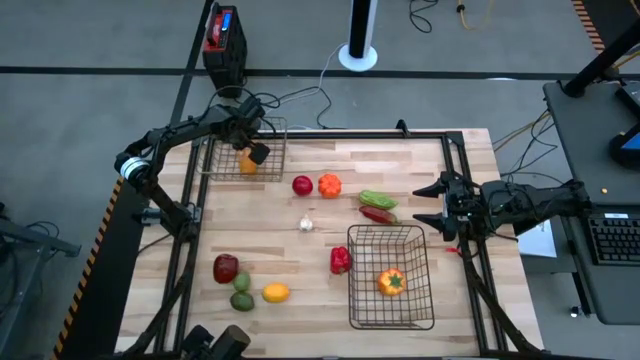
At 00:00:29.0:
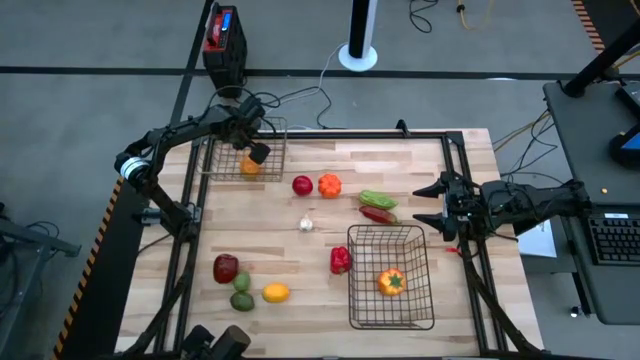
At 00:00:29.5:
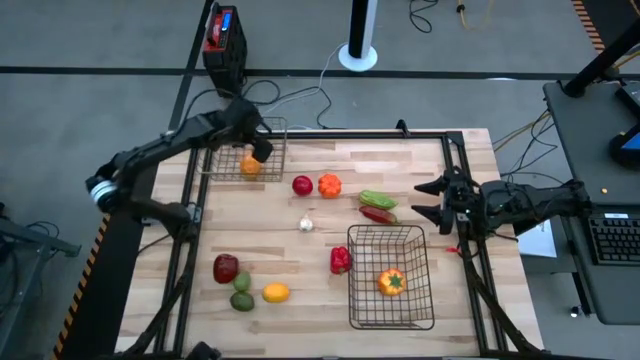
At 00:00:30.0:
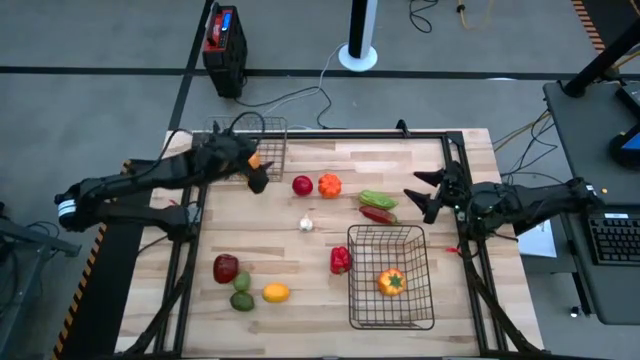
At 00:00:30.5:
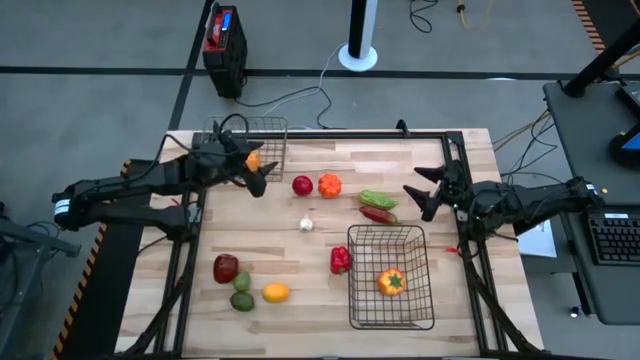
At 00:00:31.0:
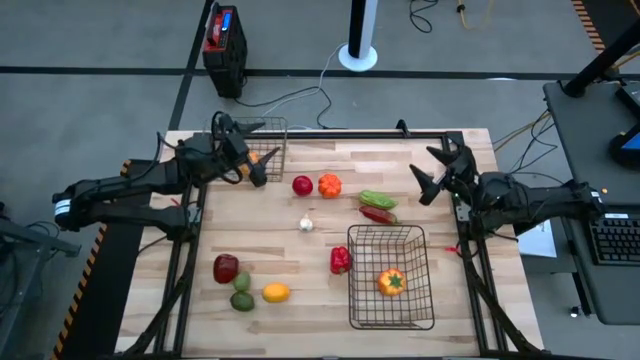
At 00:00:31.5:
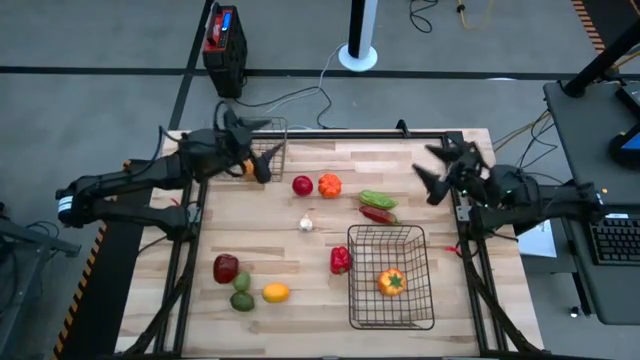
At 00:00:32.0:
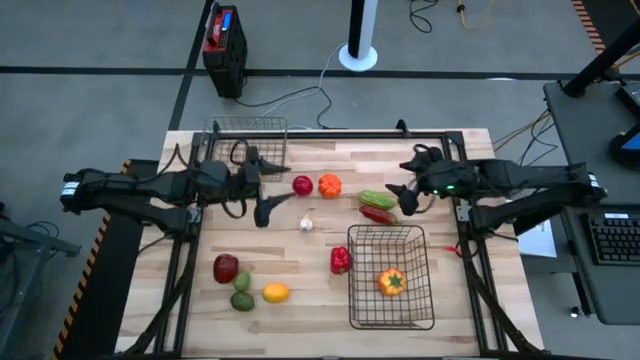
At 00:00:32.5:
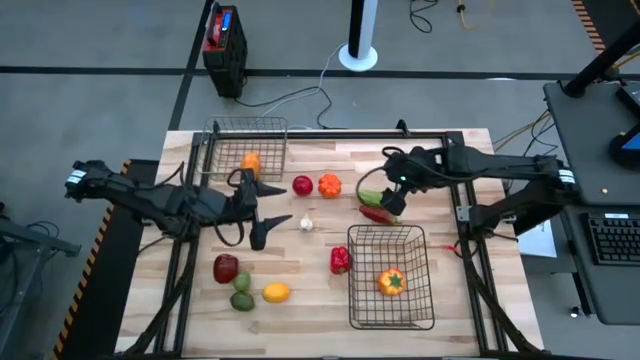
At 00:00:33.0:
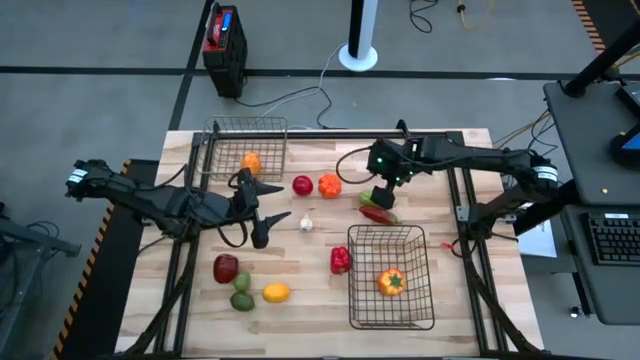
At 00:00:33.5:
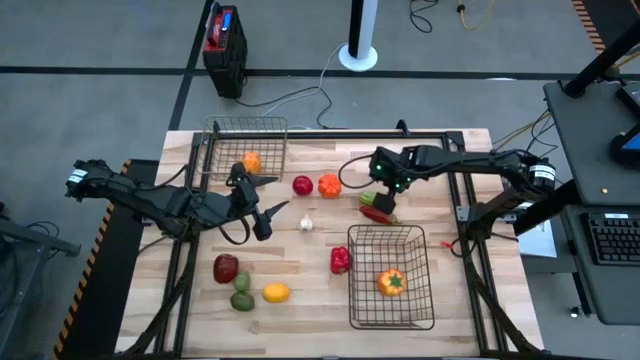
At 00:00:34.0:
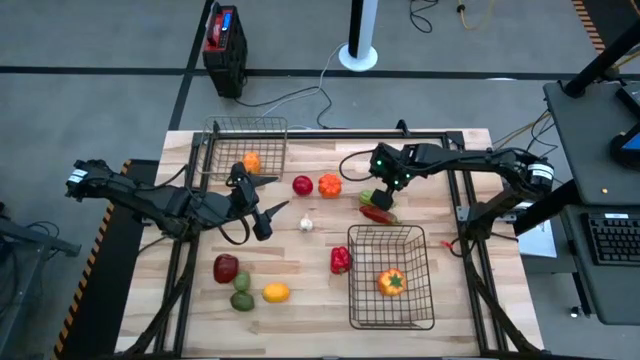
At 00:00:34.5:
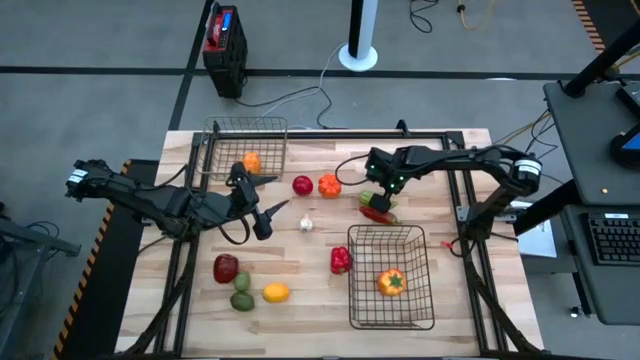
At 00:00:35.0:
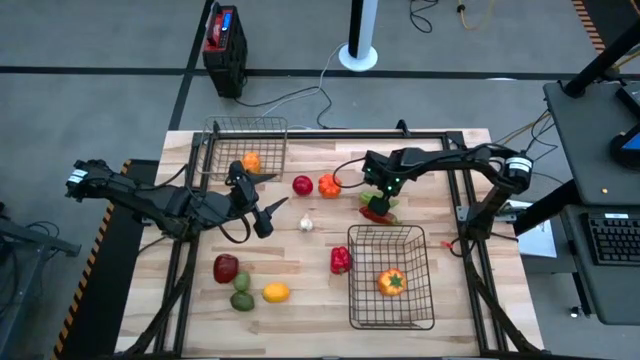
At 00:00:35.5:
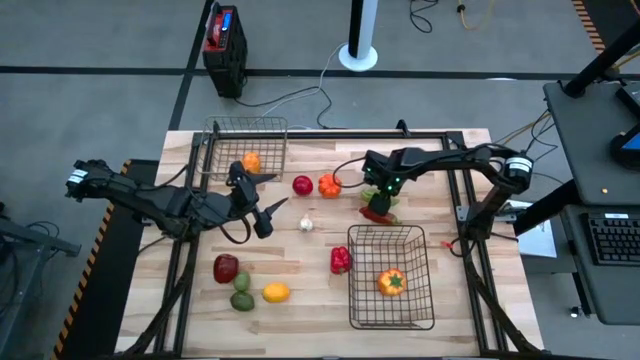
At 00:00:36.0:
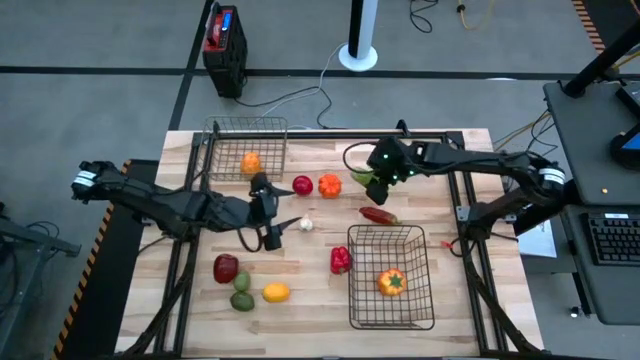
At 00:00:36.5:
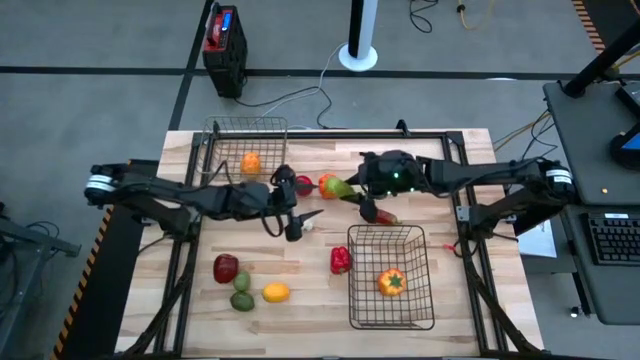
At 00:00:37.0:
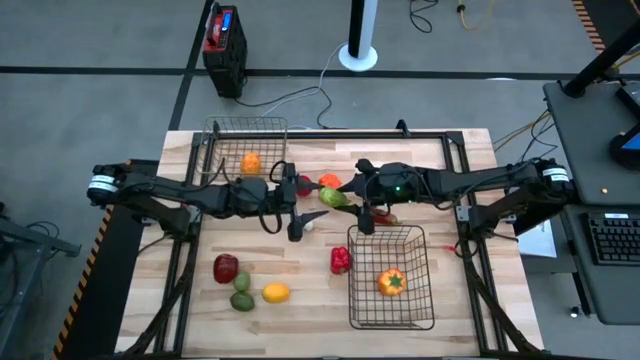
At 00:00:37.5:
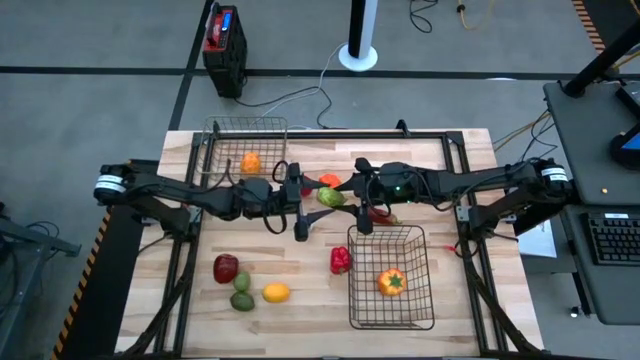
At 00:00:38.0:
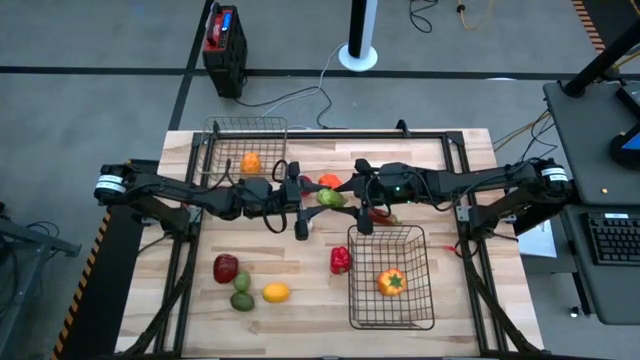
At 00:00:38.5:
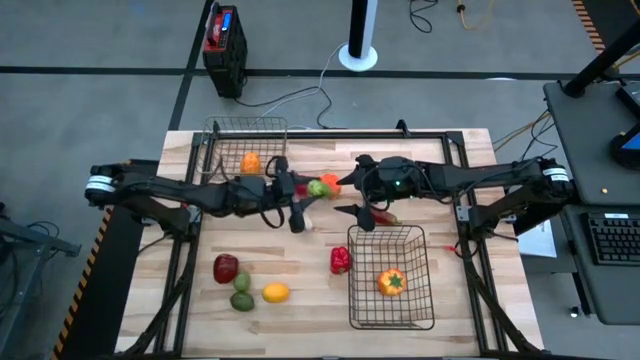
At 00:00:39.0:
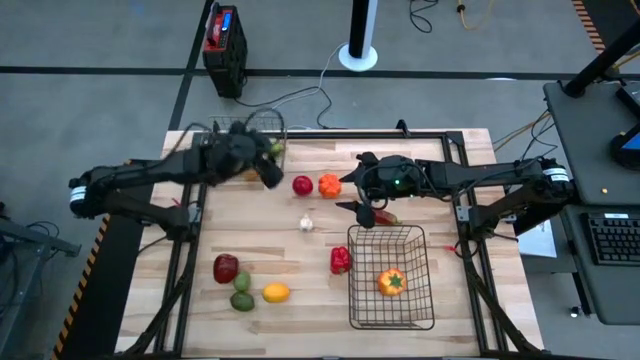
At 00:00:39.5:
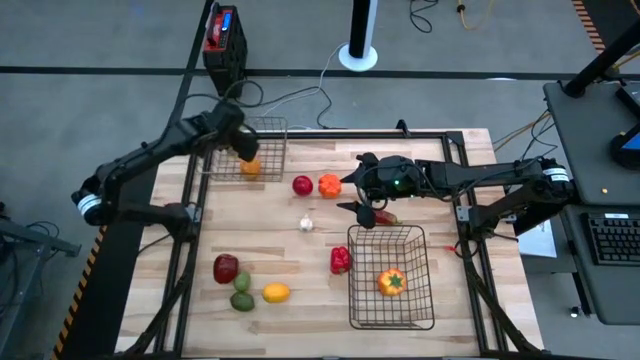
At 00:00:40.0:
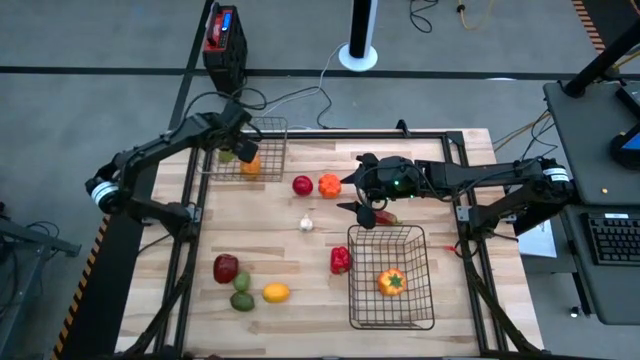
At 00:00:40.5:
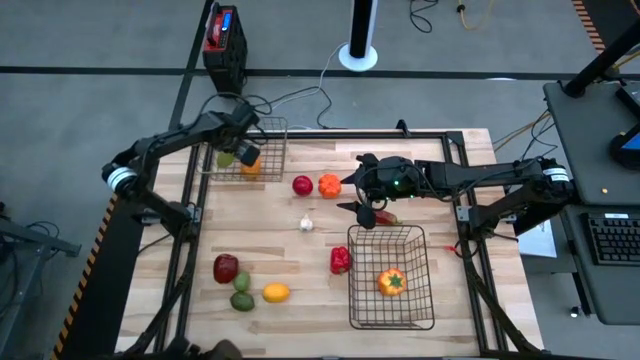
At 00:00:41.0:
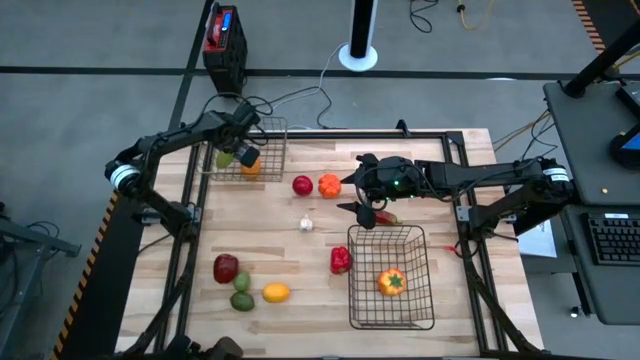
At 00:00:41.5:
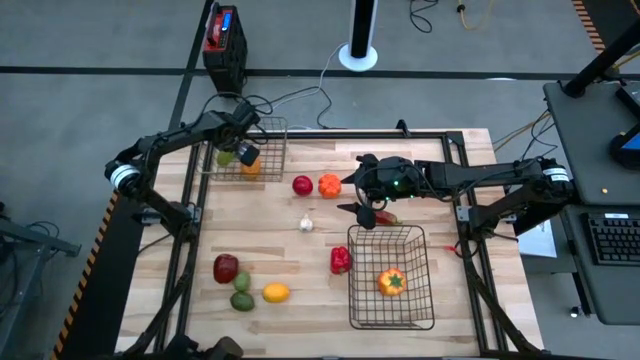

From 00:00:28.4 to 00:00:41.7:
Task: Sort produce into baskets
Put the green cucumber into the gold wire basket

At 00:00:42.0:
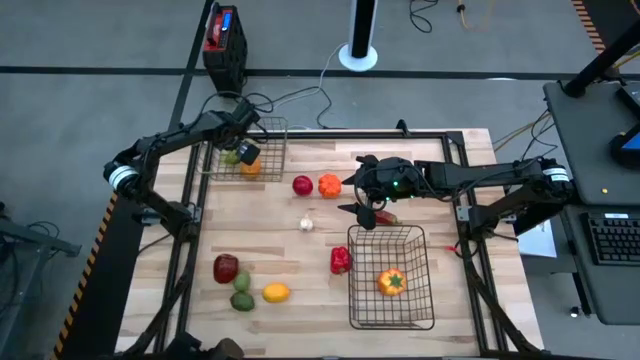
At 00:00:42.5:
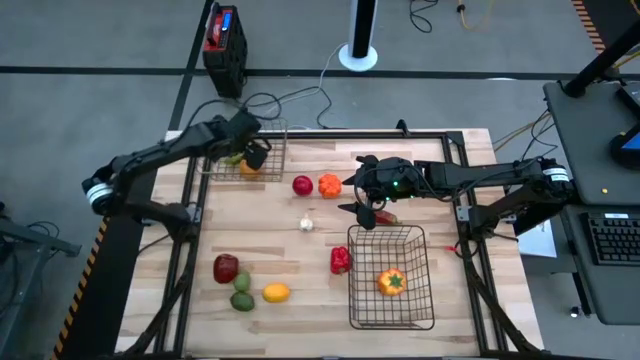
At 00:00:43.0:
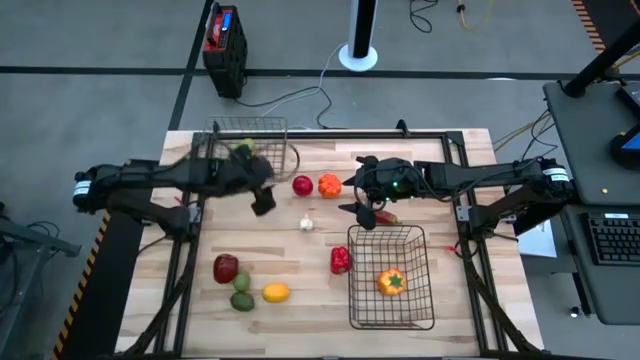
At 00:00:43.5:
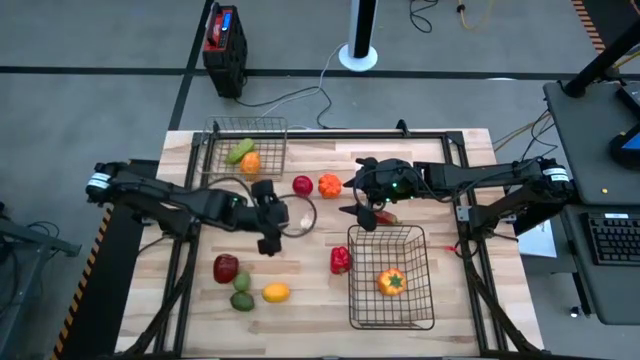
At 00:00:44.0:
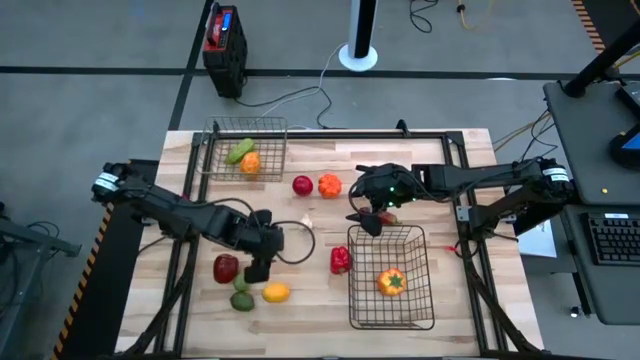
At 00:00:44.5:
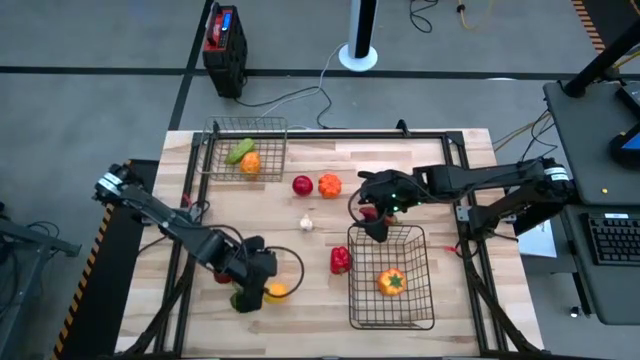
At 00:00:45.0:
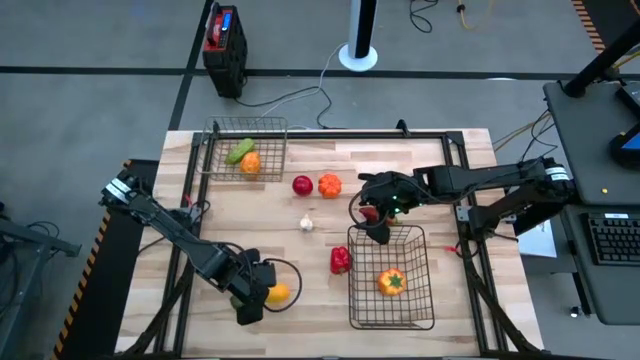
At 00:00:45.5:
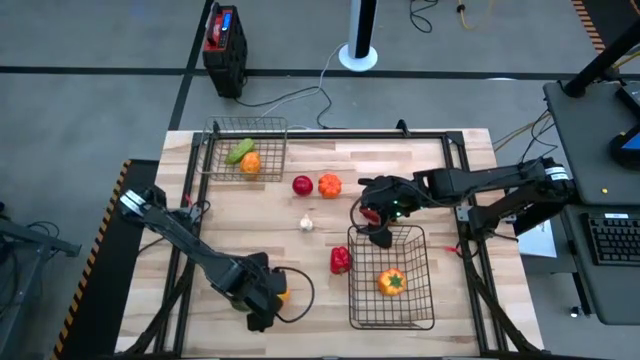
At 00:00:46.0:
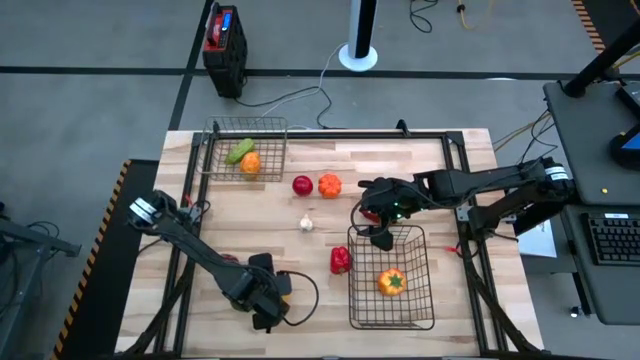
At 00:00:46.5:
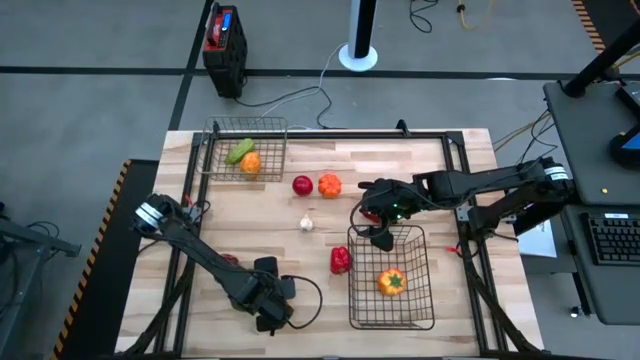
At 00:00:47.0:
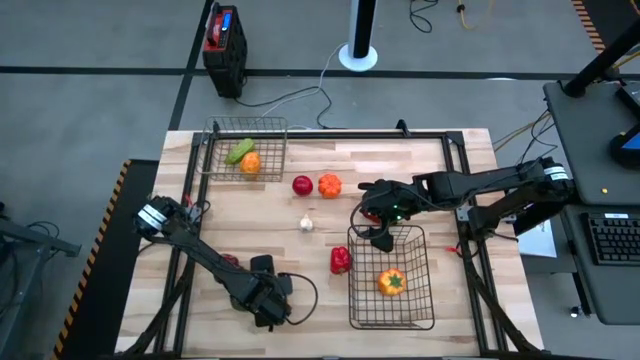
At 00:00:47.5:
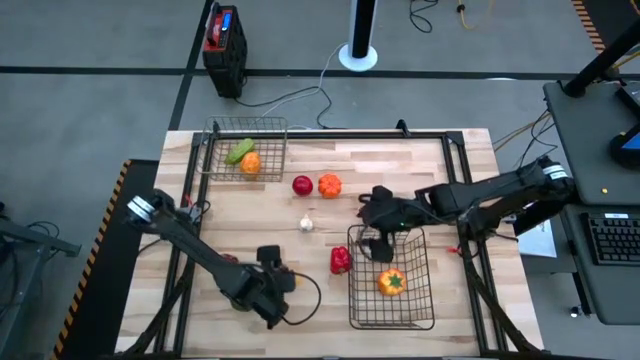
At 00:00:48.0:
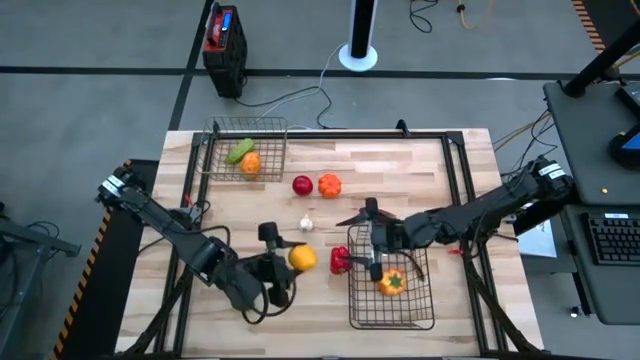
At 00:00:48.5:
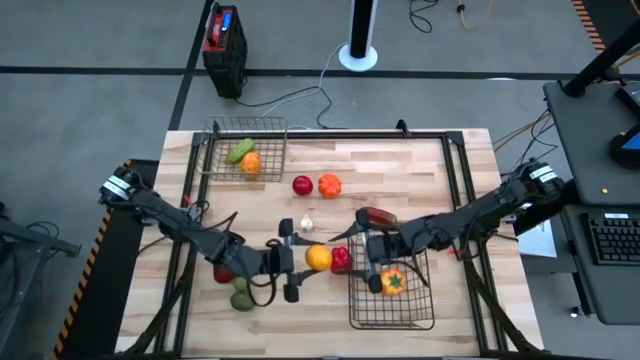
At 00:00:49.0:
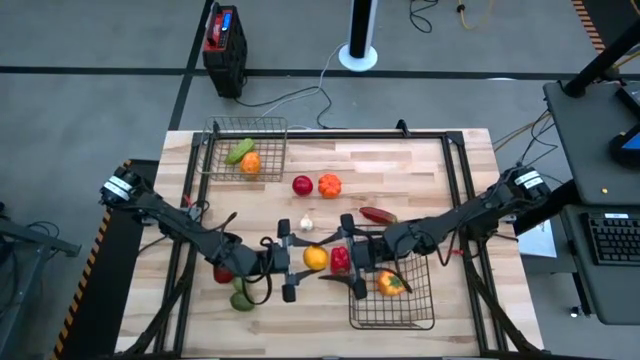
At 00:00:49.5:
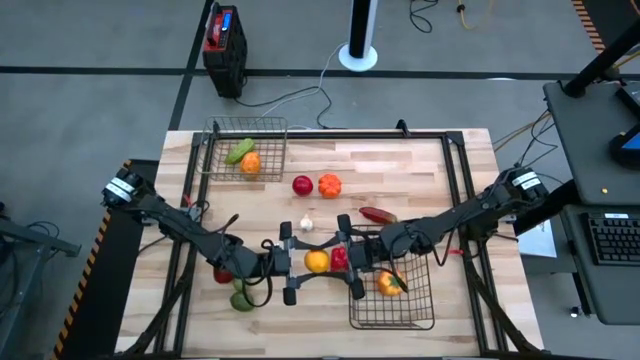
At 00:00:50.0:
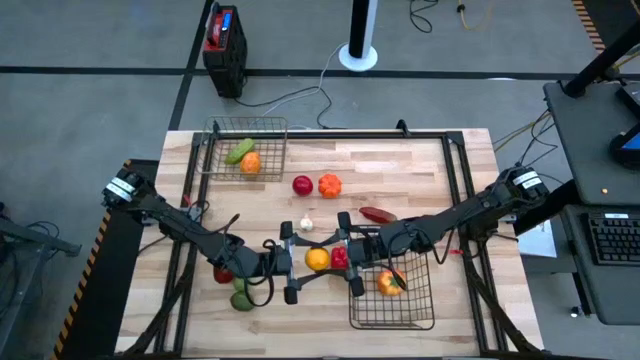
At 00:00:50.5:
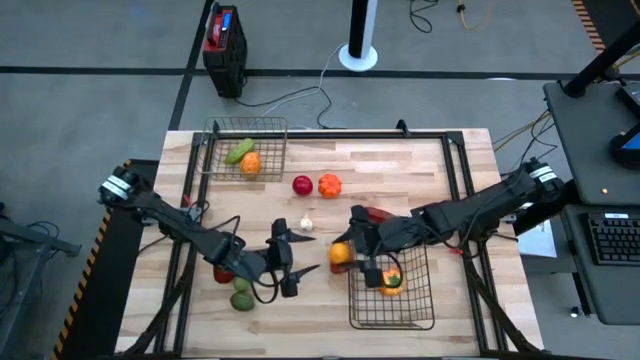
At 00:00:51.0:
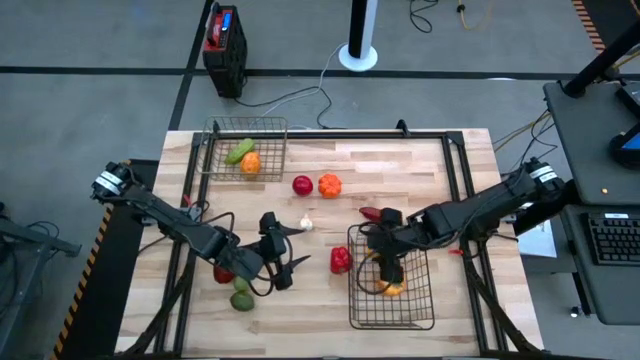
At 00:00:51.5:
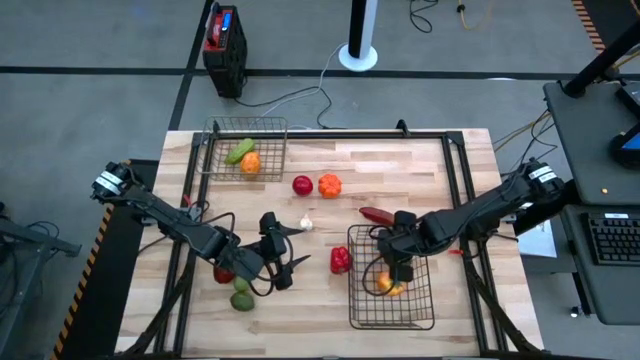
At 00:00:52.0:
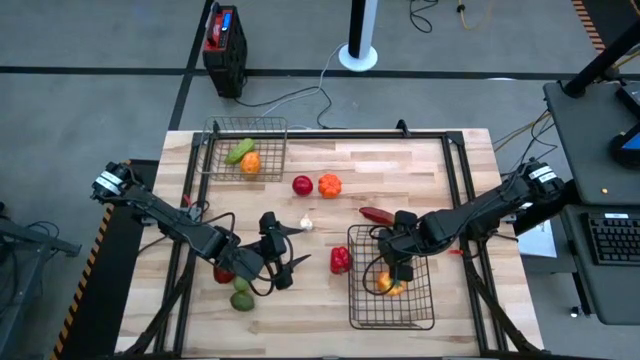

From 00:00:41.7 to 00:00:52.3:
Put the yellow lemon into the black wire basket
